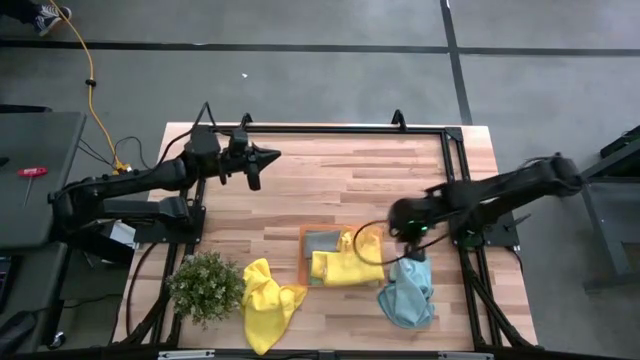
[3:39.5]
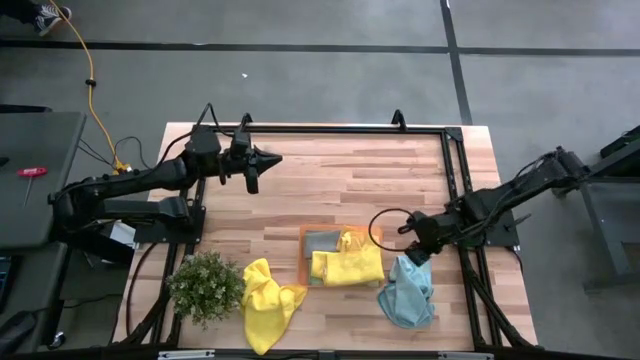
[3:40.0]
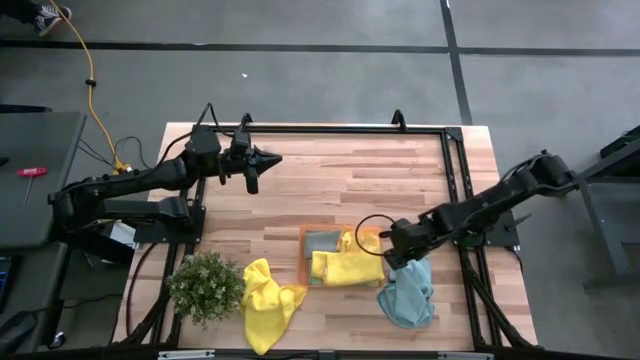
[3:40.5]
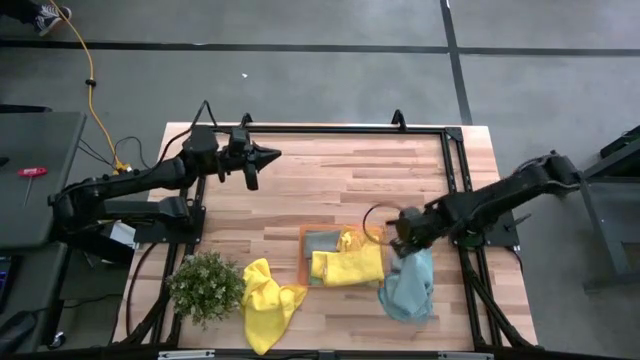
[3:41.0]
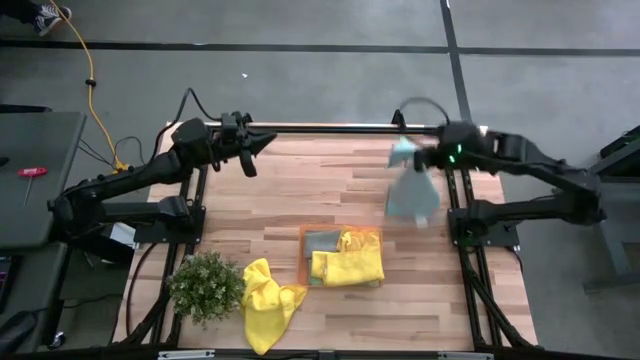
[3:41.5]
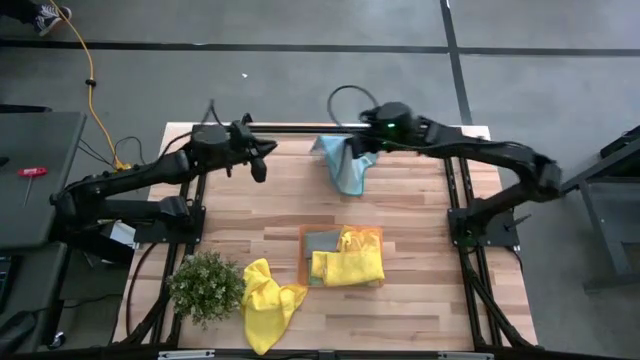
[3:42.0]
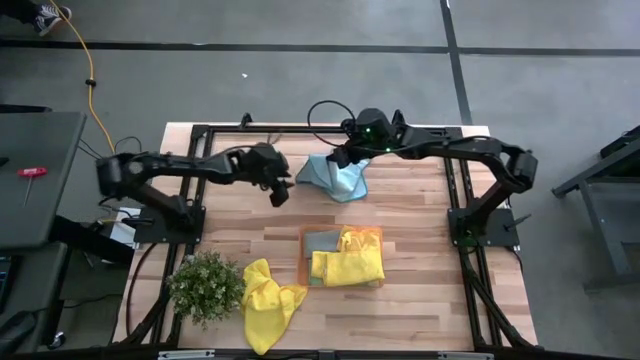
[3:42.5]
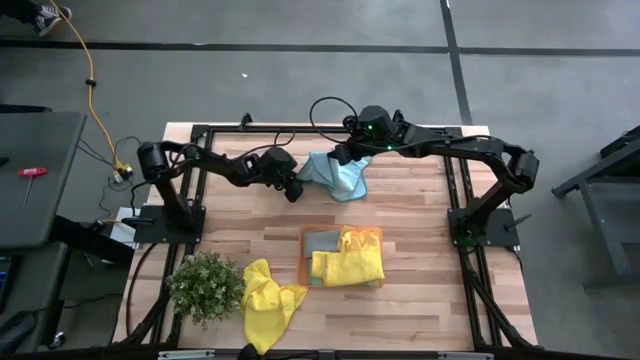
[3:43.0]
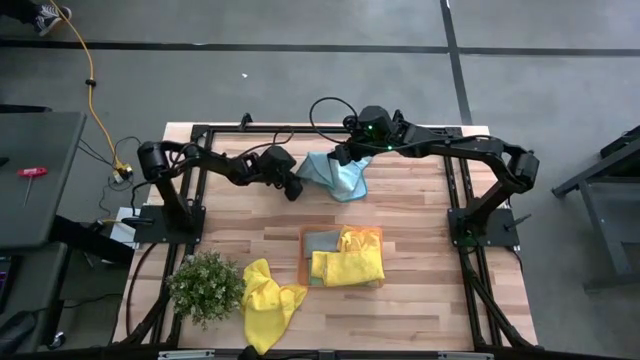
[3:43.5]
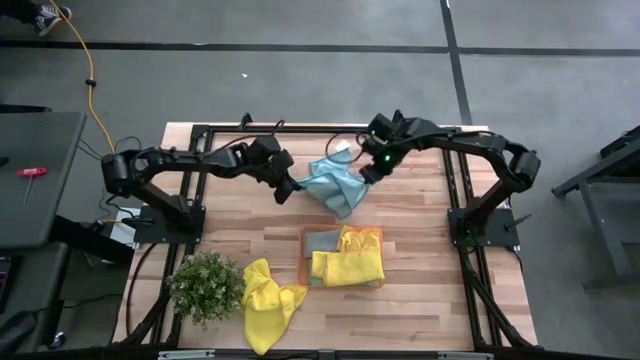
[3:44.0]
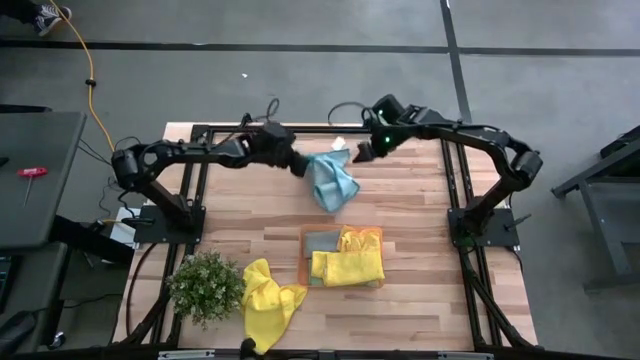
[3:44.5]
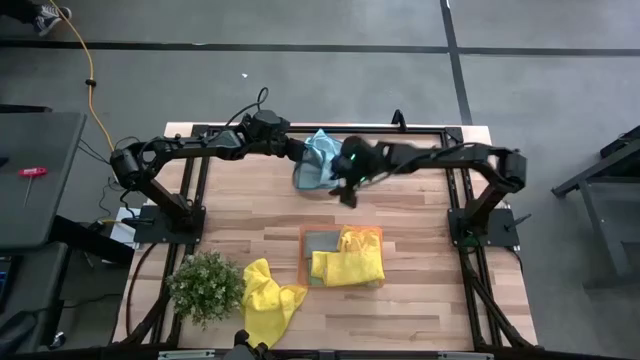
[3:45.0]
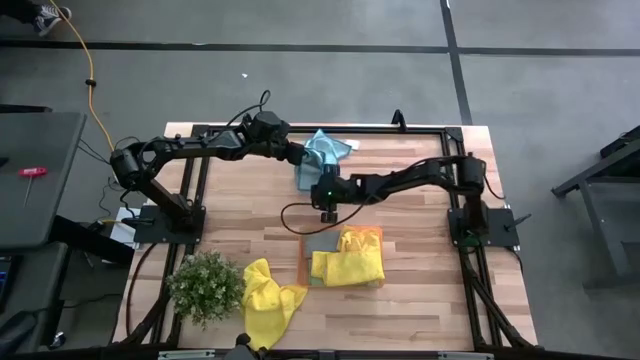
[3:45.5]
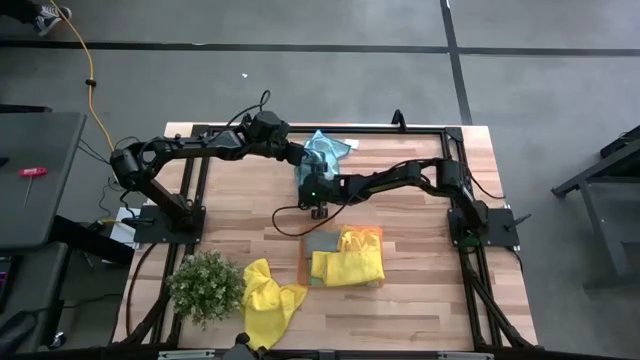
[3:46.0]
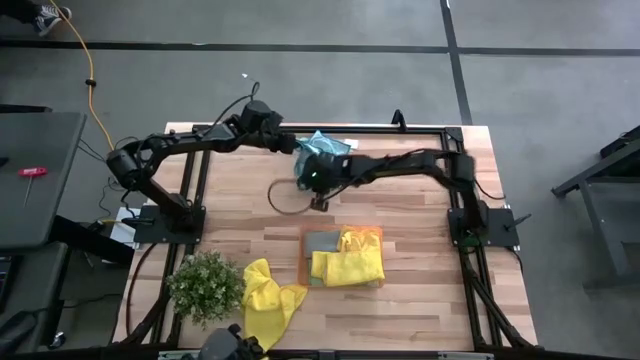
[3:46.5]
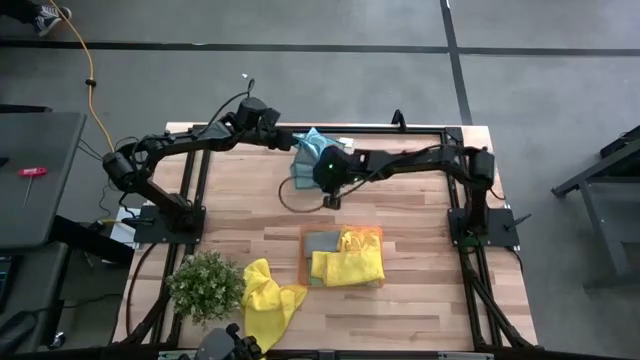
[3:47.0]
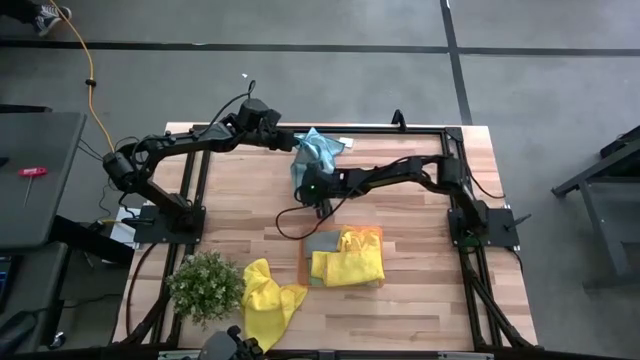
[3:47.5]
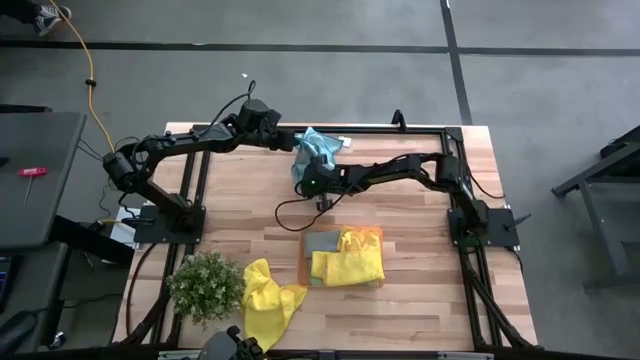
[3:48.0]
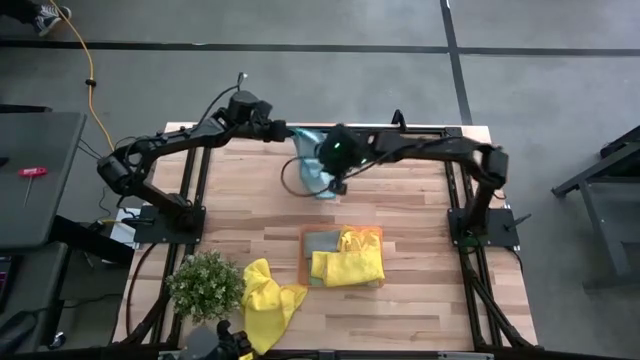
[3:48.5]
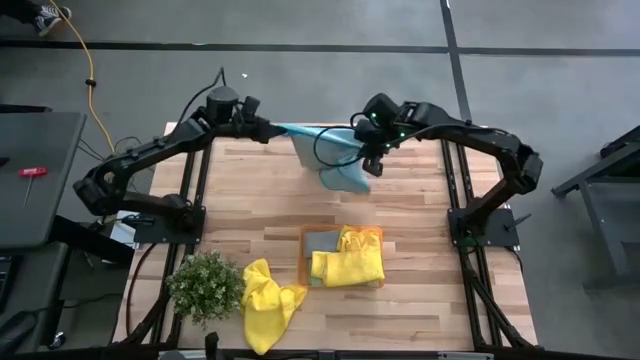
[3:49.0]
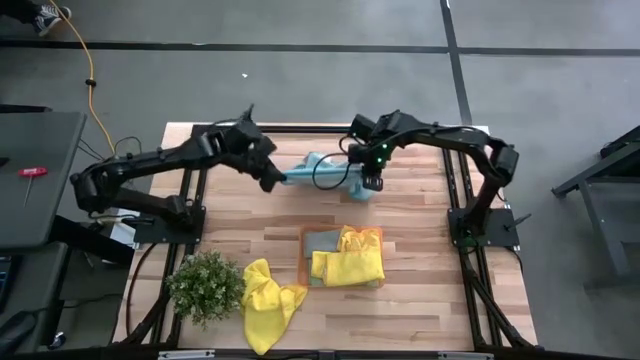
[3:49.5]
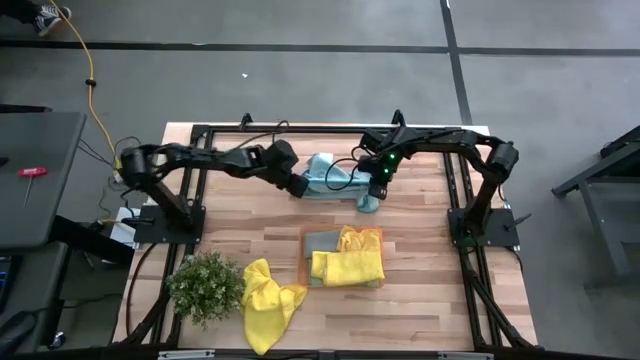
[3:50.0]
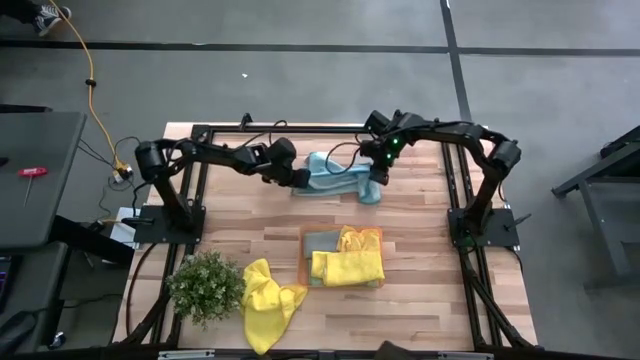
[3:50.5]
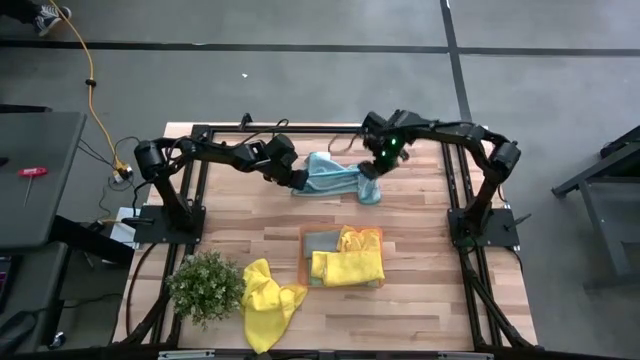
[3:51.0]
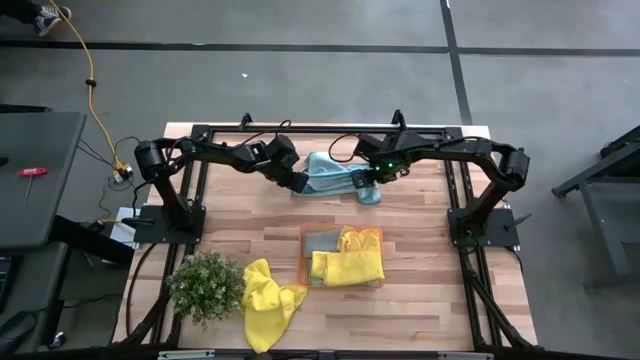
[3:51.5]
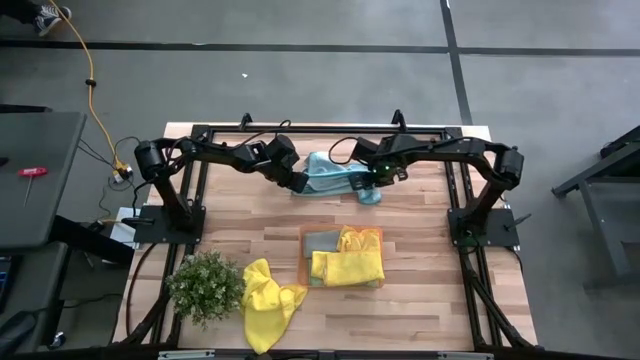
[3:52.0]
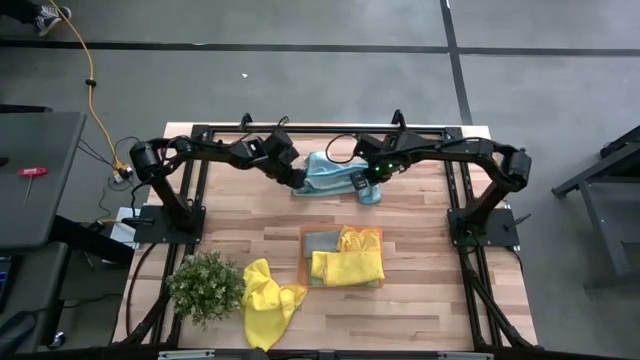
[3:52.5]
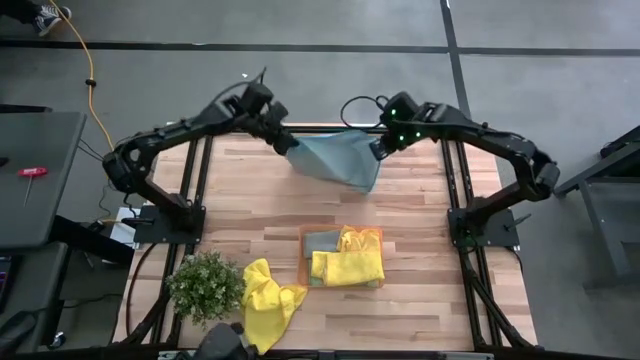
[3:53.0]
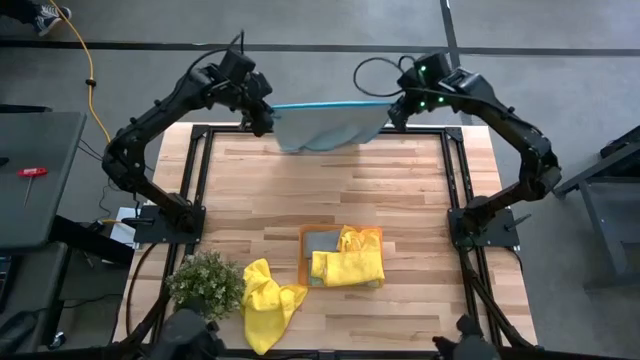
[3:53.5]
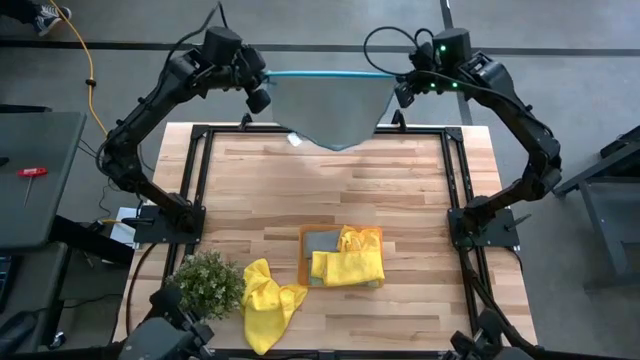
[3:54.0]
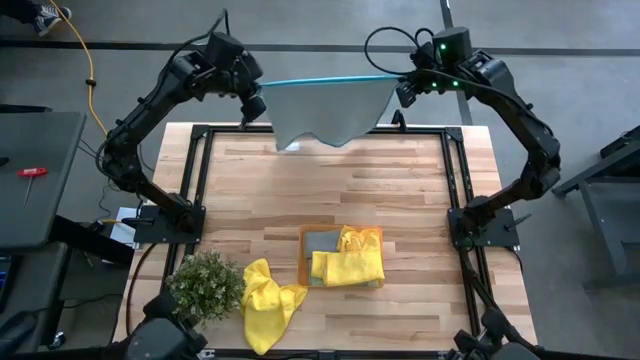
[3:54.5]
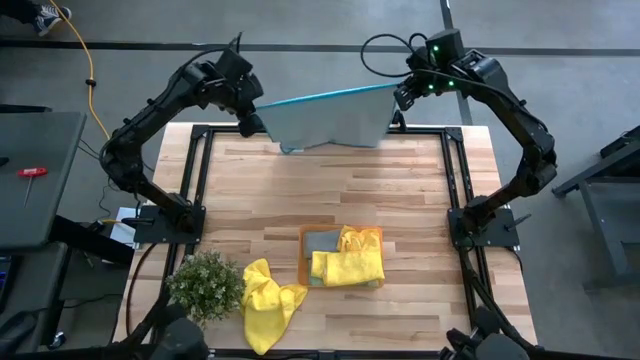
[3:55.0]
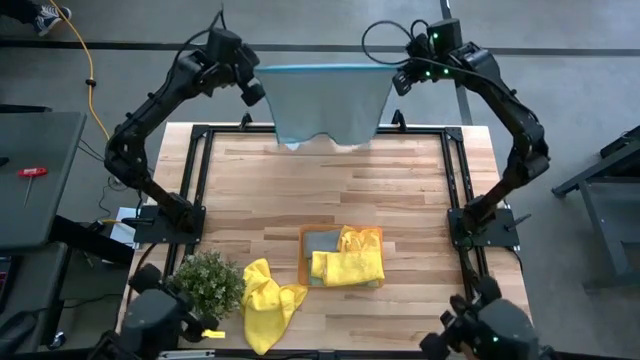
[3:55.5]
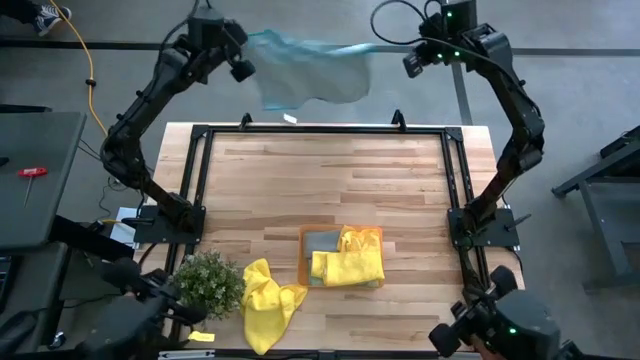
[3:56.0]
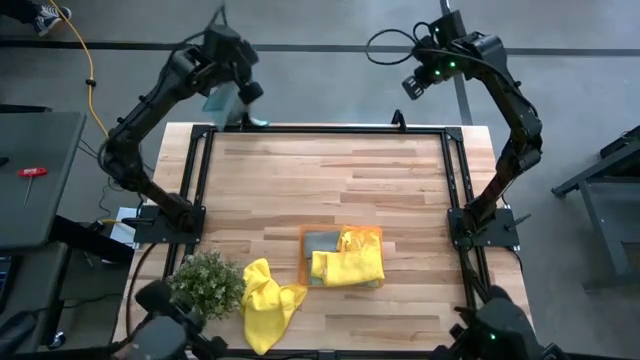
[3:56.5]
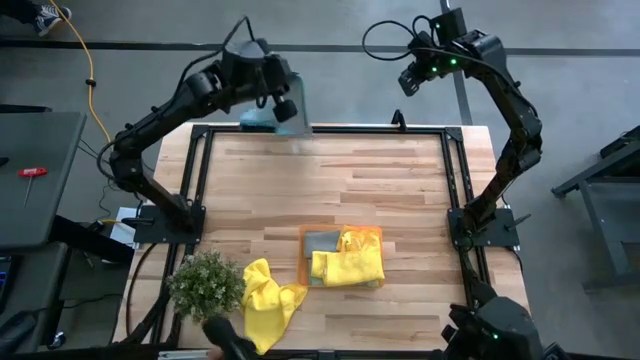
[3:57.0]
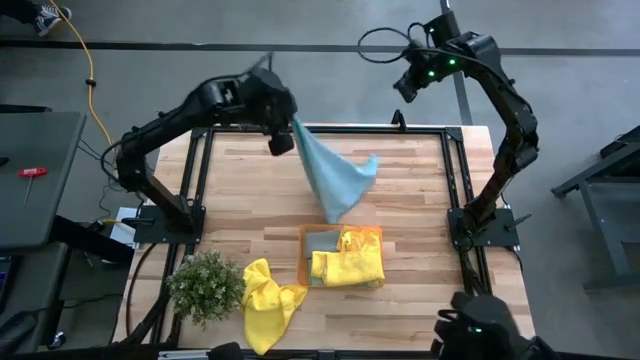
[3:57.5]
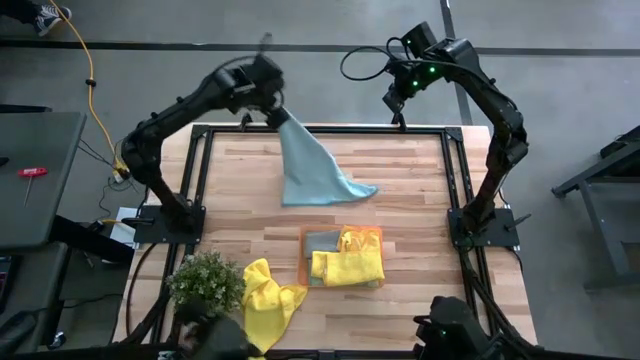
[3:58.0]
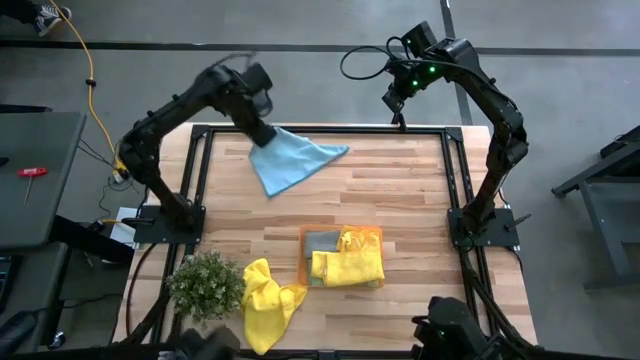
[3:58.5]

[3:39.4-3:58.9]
Task: Fold microfiber towels
Fold the blue microfiber towel
